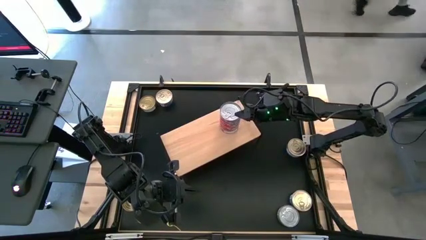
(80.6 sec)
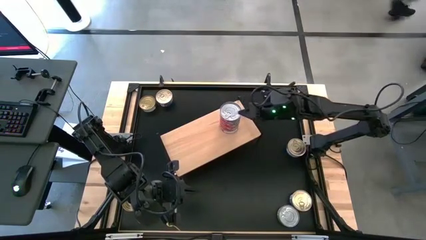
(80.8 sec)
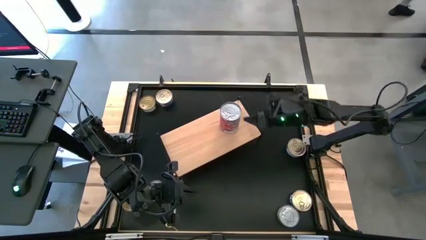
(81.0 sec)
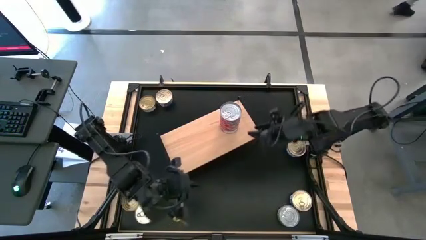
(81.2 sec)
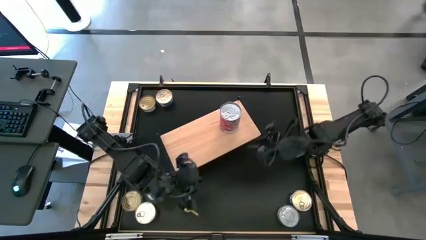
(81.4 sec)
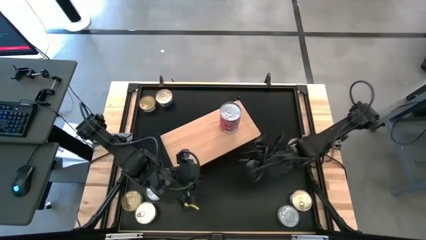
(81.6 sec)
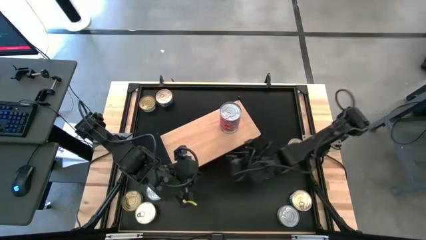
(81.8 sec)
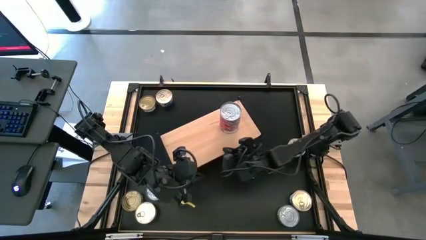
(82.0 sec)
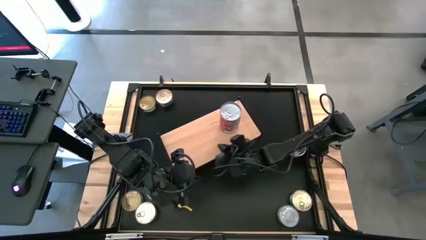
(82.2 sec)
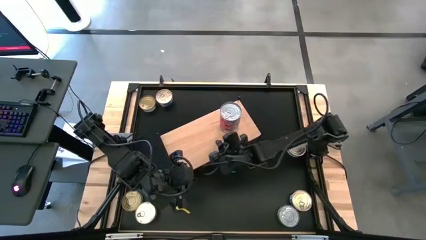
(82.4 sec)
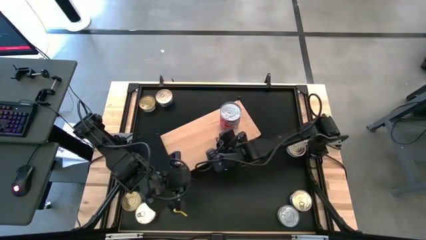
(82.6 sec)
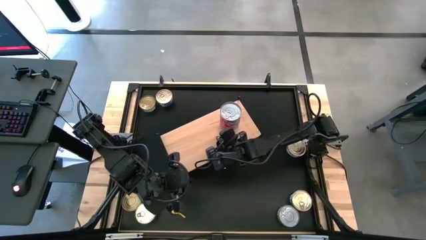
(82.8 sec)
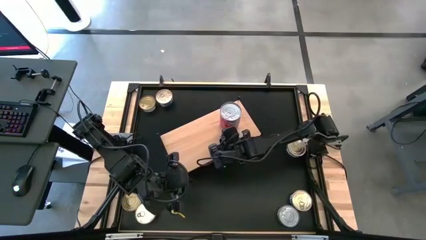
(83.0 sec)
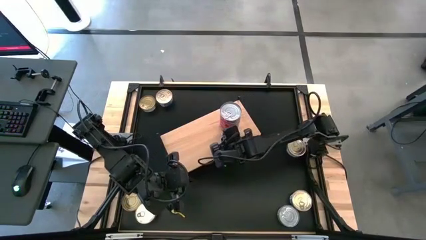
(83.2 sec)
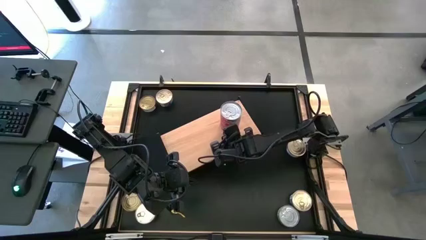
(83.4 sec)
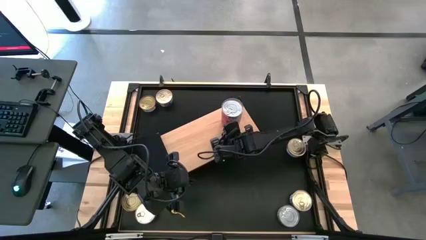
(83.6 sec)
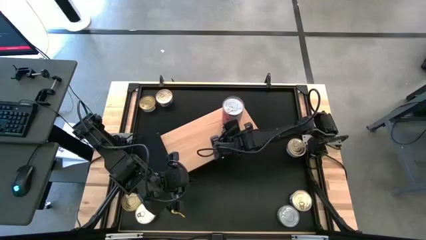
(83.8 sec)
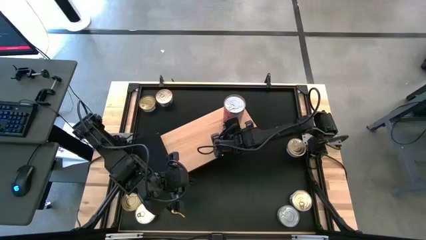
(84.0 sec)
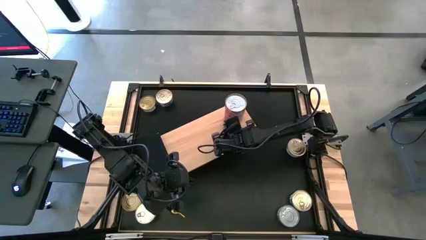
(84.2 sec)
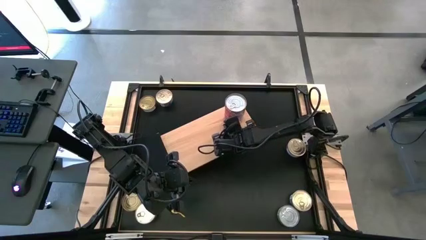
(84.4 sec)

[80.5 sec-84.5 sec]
Task: Stack canned seafood by type on shelf
Adjust the red stacked tuna cans on the shelf

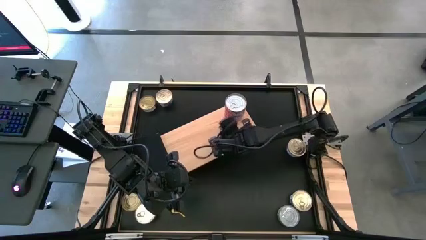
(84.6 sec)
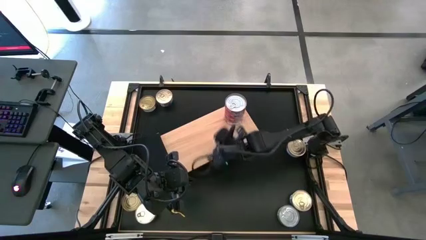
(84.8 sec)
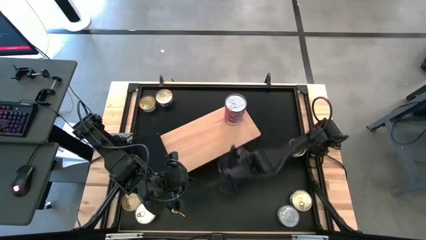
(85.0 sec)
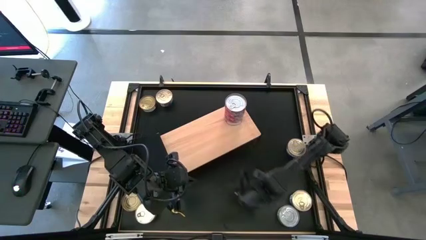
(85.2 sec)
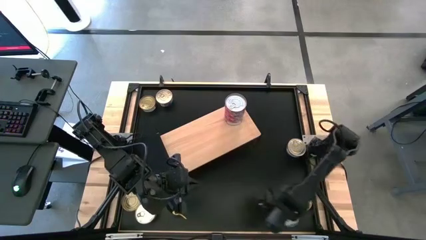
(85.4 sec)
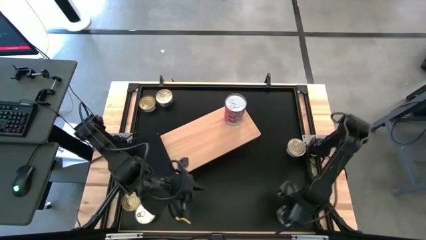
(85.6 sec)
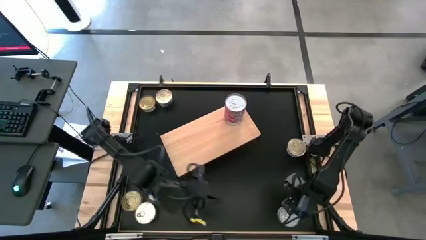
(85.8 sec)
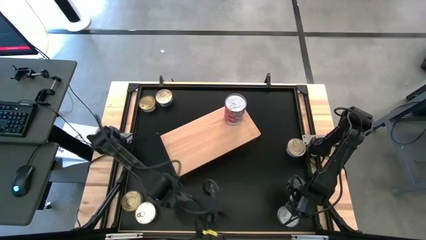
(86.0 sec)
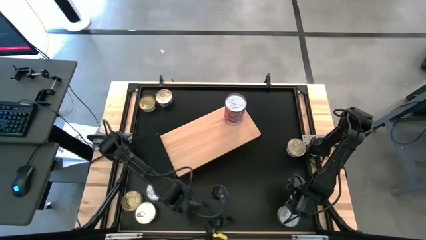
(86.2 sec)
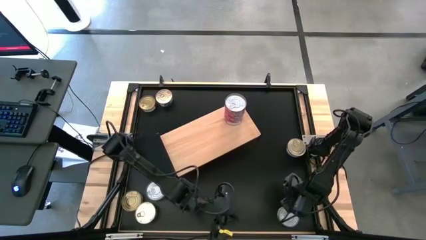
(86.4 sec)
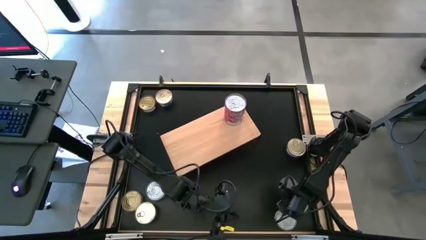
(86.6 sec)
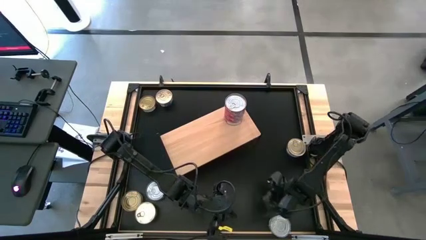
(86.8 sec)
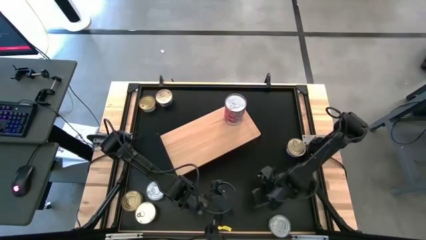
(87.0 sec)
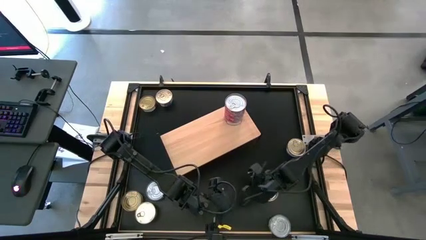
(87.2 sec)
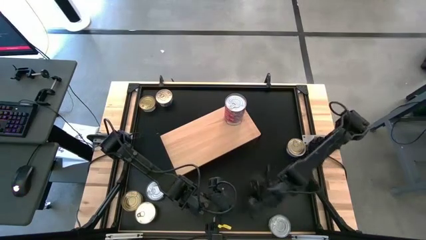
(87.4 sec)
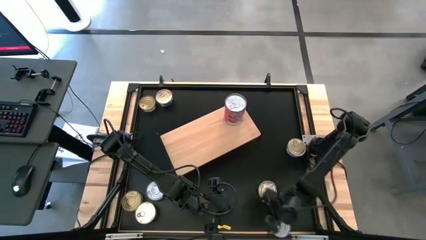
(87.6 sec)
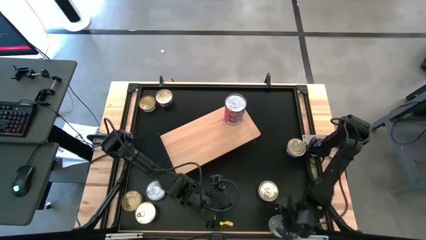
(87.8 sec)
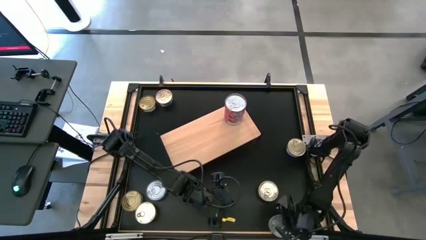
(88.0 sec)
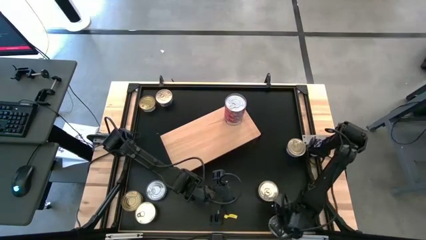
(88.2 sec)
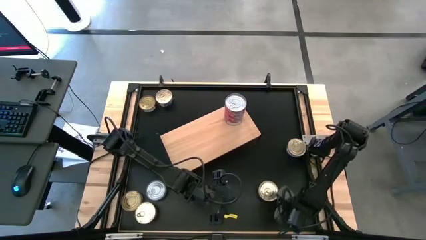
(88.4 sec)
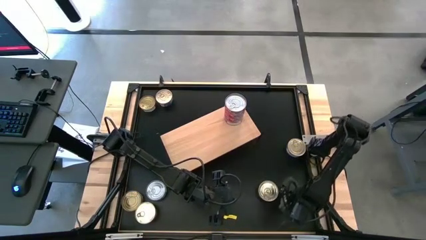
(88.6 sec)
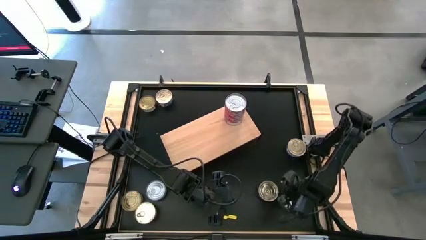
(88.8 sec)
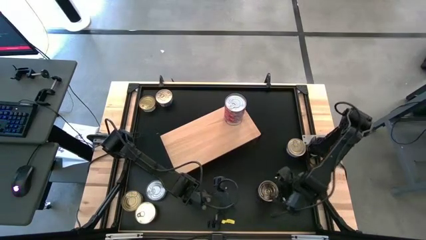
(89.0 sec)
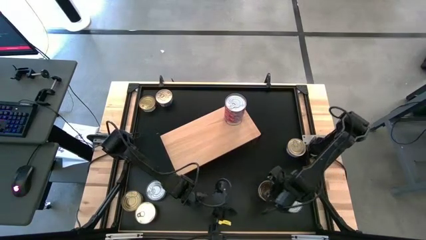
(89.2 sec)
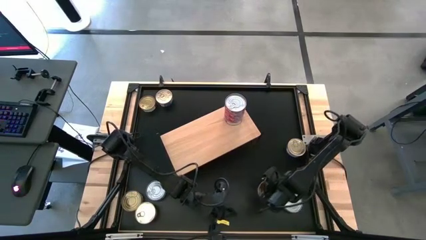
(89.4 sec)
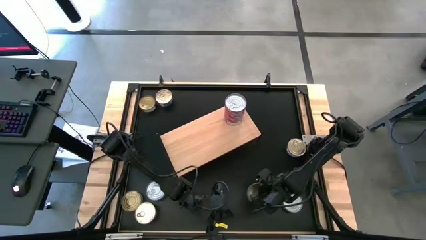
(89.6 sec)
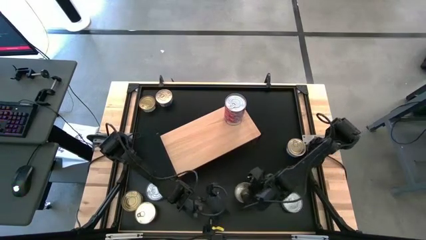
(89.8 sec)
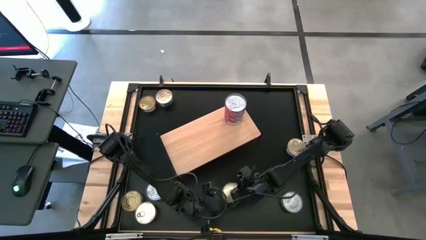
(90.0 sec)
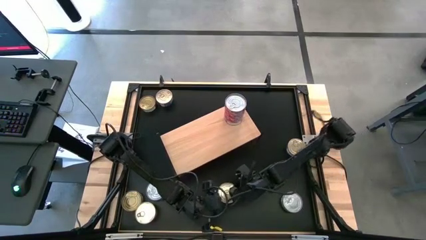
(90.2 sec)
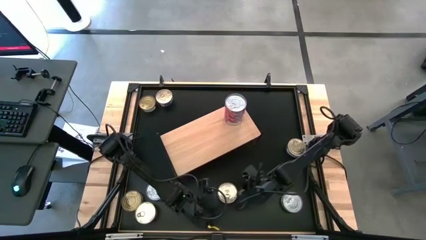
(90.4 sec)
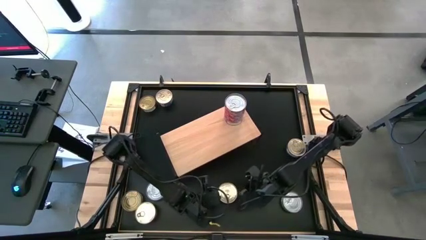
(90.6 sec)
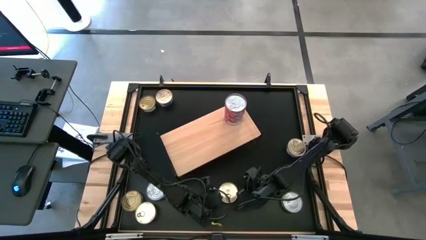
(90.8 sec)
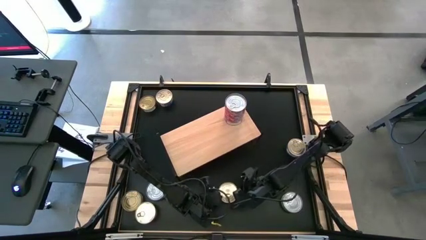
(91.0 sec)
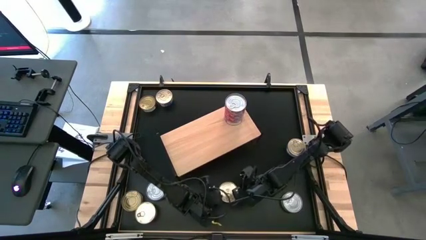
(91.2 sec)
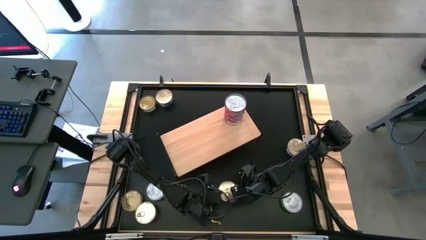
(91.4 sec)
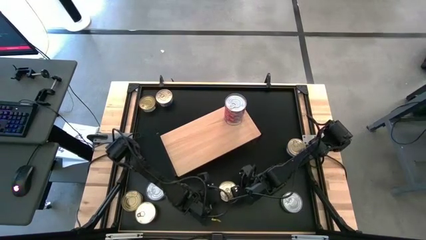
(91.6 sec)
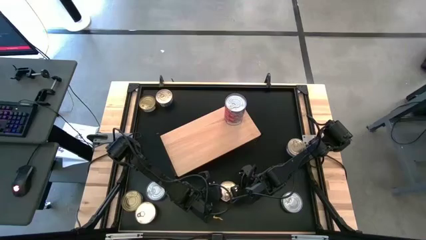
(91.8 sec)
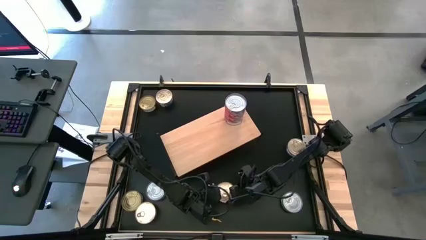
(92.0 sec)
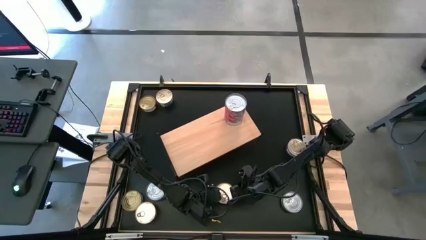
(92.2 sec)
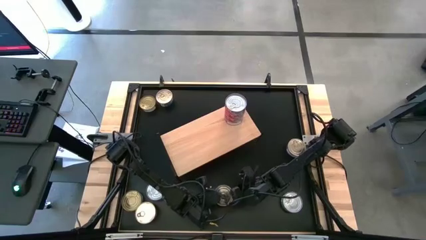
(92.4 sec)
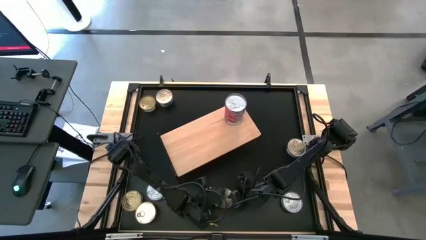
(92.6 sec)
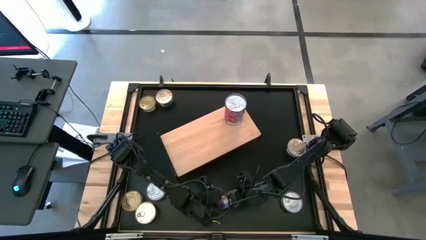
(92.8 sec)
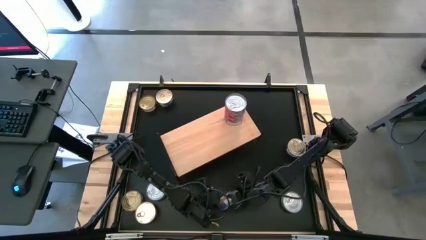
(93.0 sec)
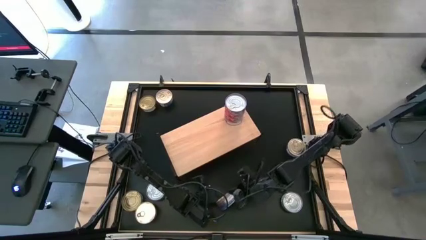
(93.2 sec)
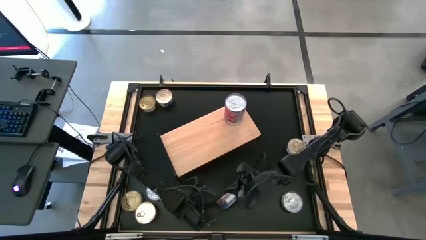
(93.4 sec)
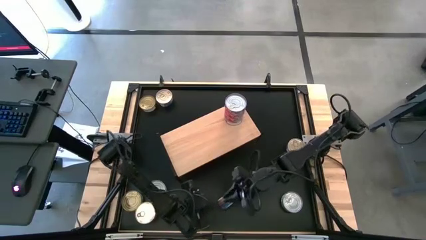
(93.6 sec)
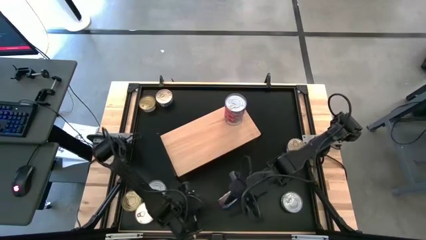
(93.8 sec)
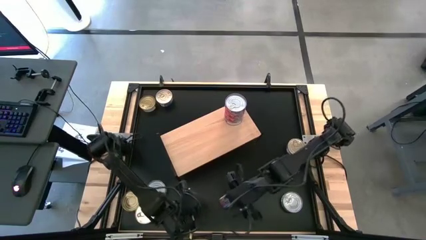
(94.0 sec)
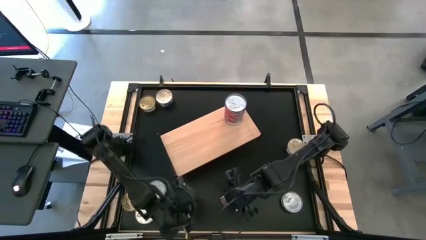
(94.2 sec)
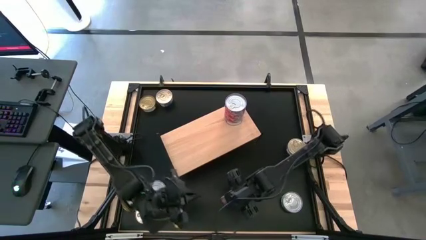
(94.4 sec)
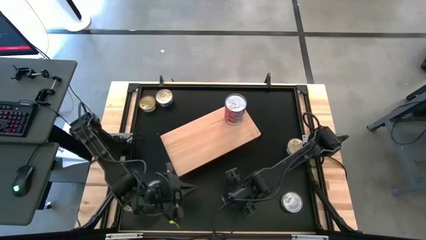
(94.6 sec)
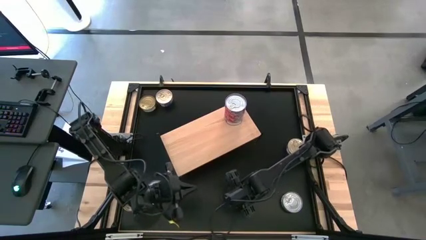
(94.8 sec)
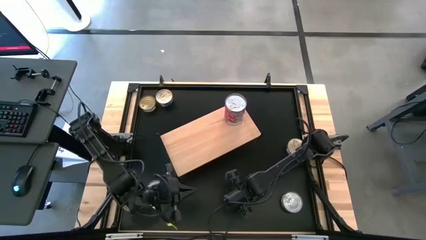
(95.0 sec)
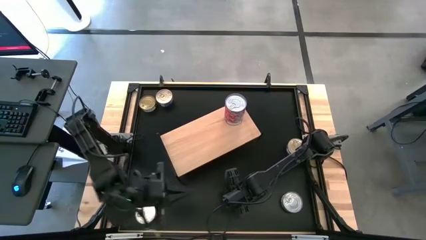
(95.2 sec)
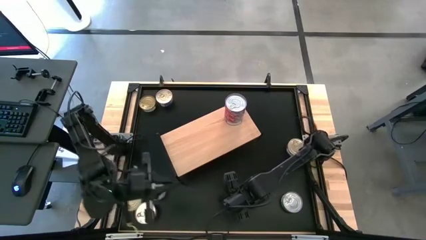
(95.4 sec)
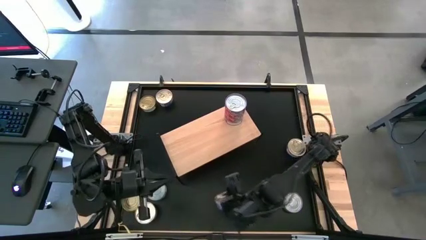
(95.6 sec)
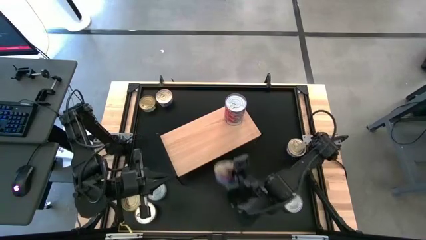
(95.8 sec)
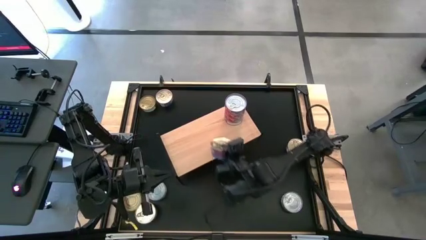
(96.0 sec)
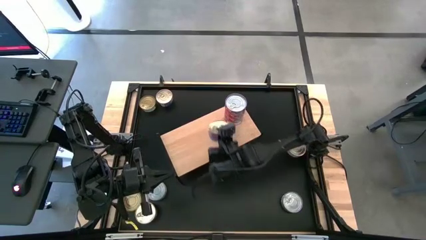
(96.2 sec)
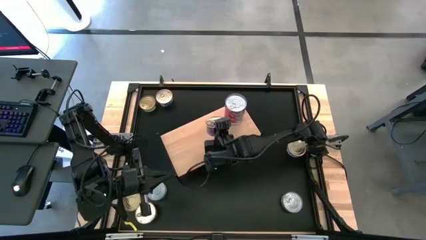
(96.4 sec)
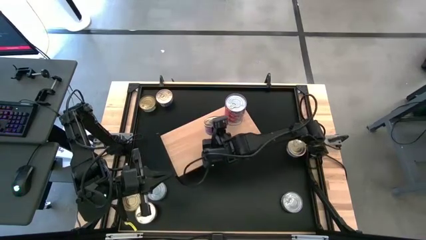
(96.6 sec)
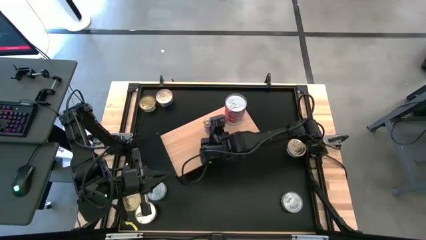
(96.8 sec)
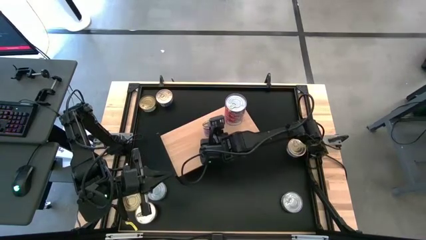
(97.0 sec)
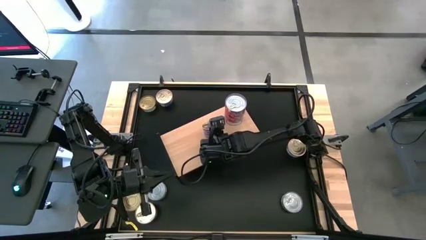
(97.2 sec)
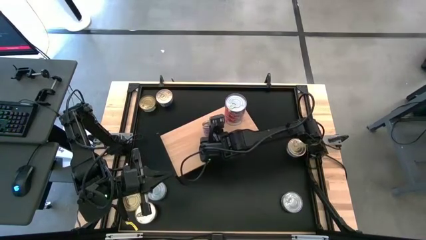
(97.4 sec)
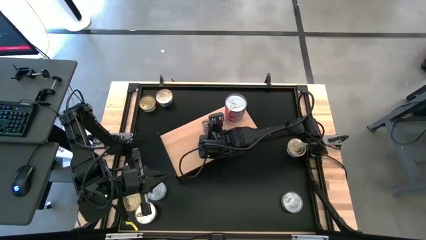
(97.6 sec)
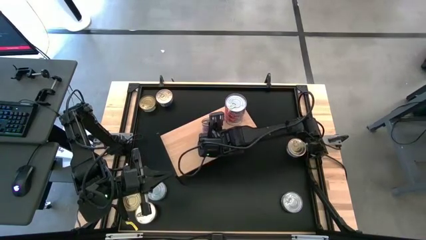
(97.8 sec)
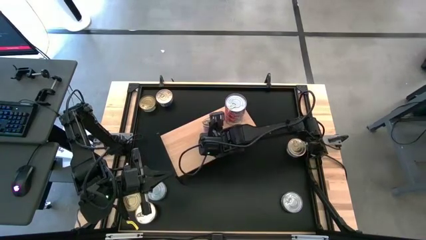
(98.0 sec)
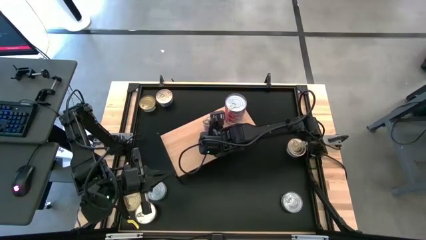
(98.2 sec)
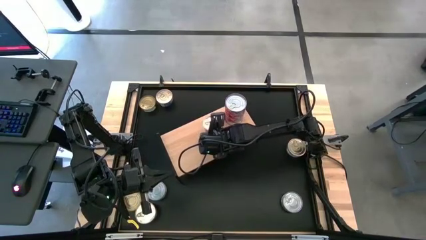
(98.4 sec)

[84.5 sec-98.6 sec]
Put the blue tuna can on the shelf
